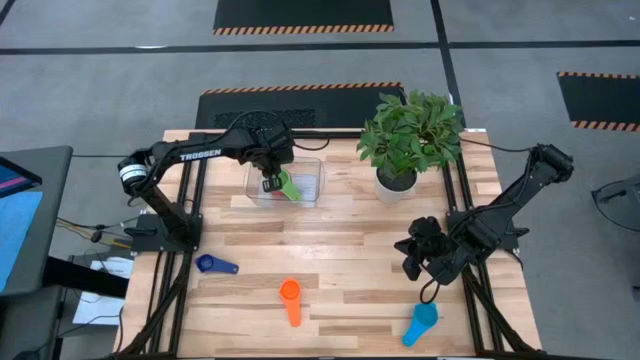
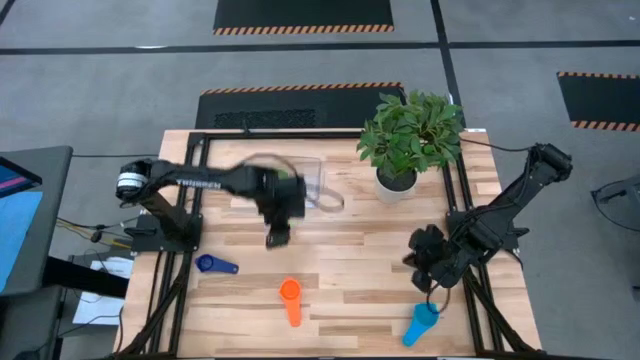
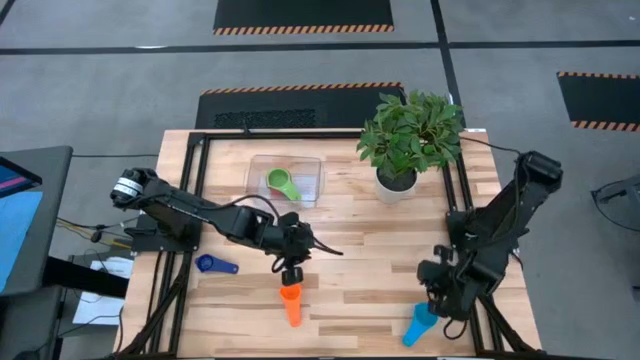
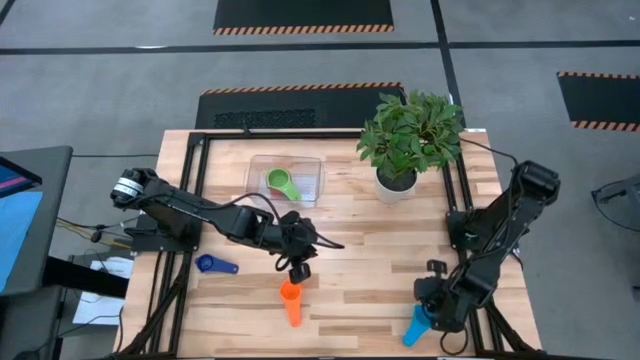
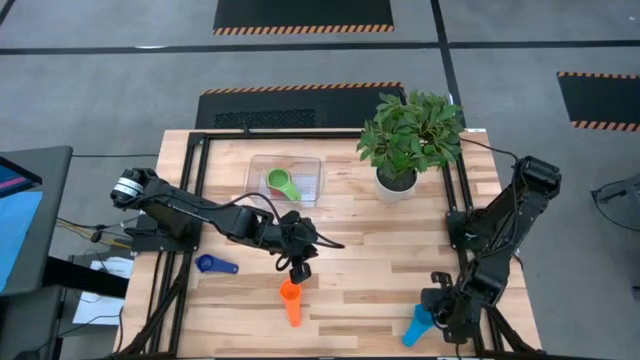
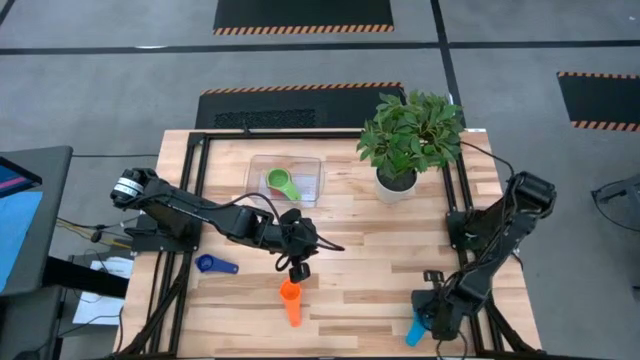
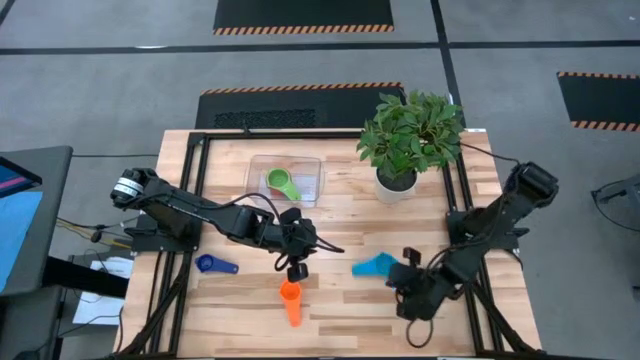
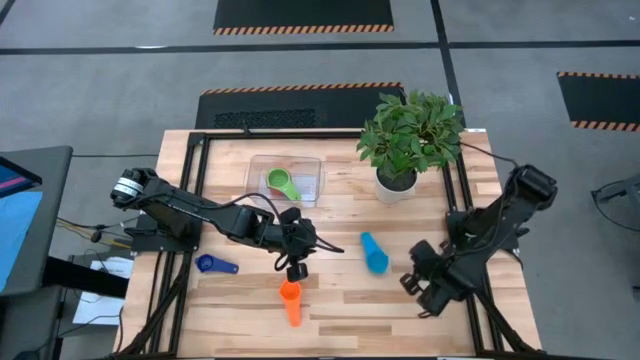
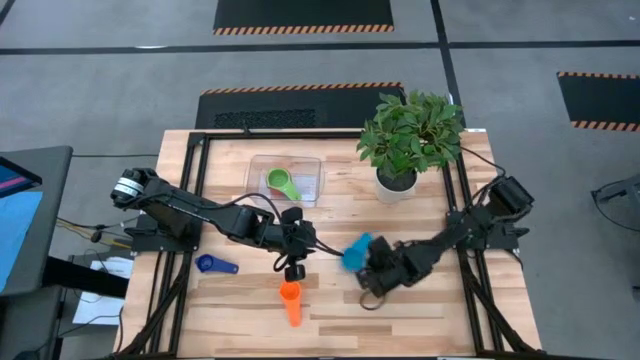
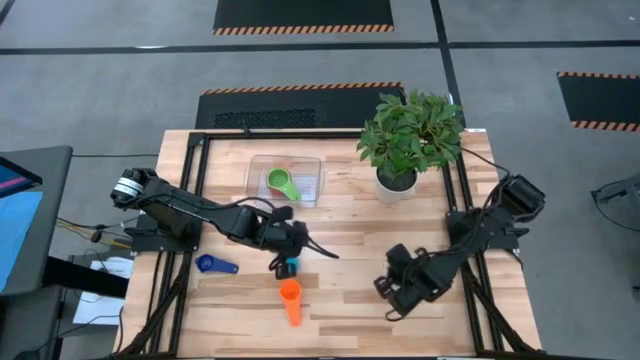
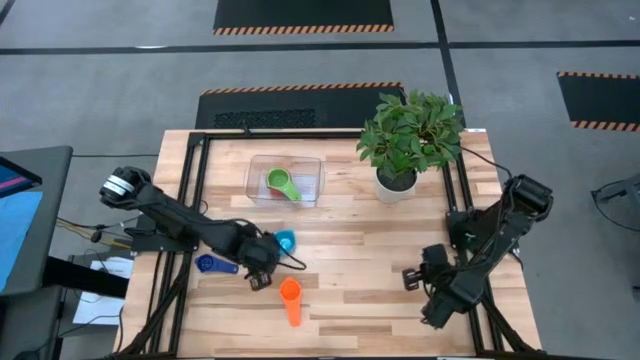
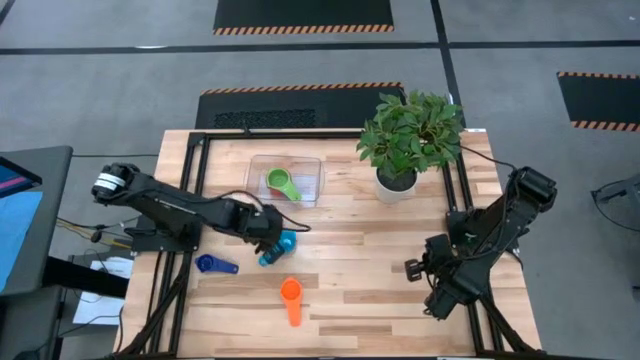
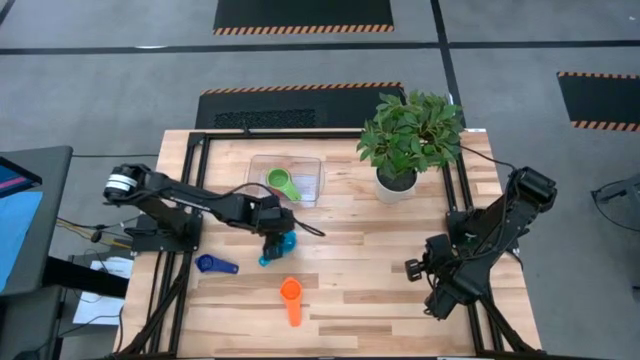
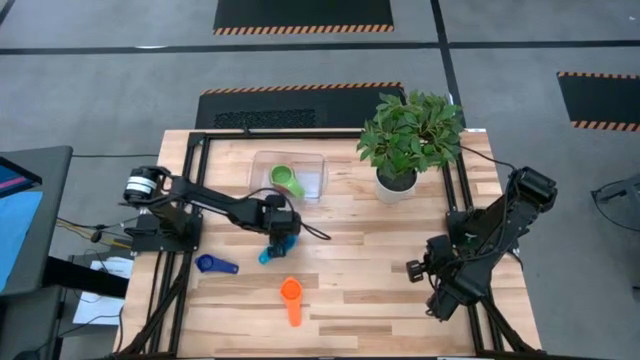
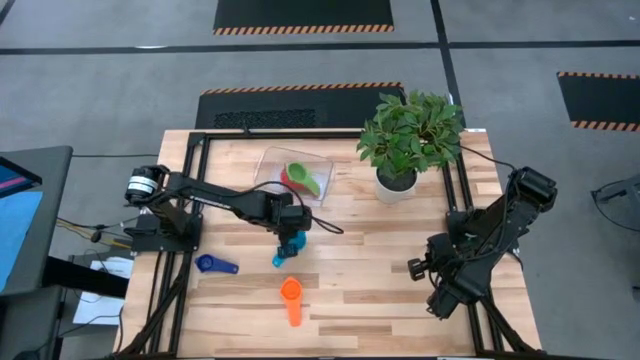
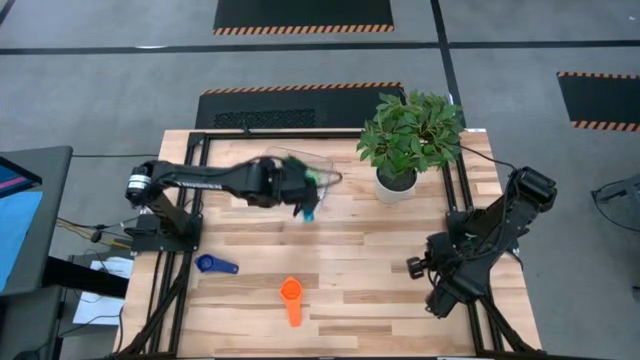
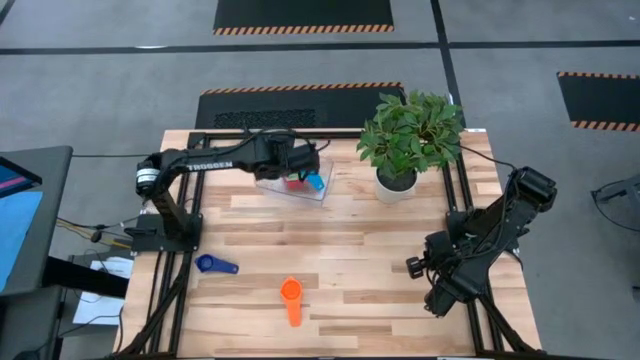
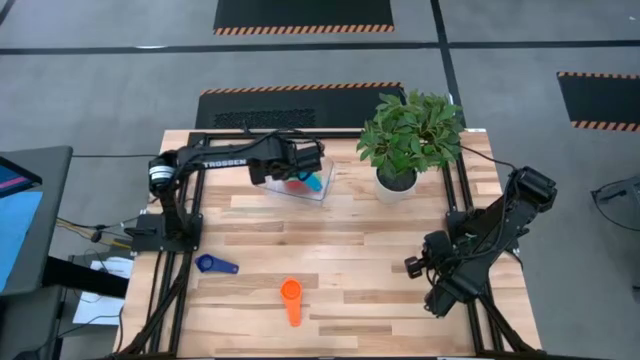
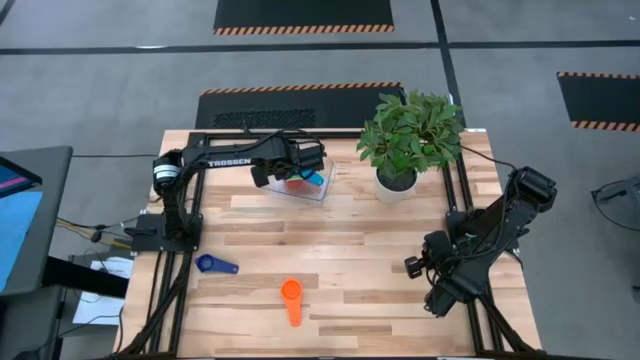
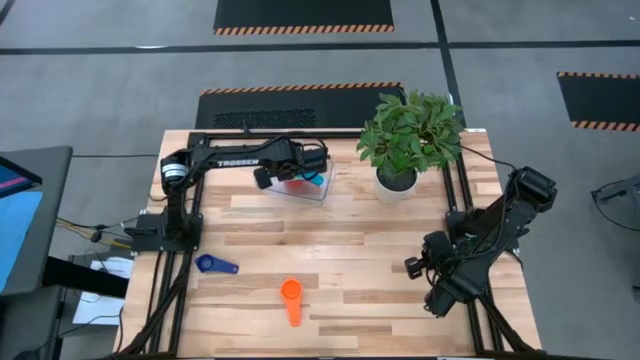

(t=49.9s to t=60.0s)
Task: Nest measuring cups in basket
Stack the light blue measuring cup on top of the green measuring cup in the transparent bin

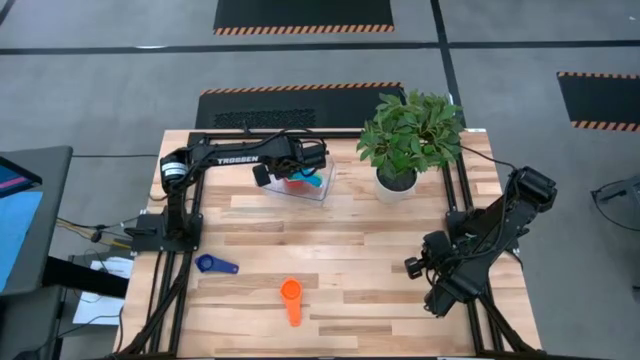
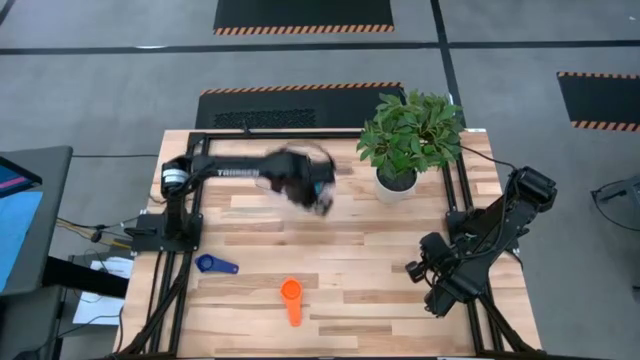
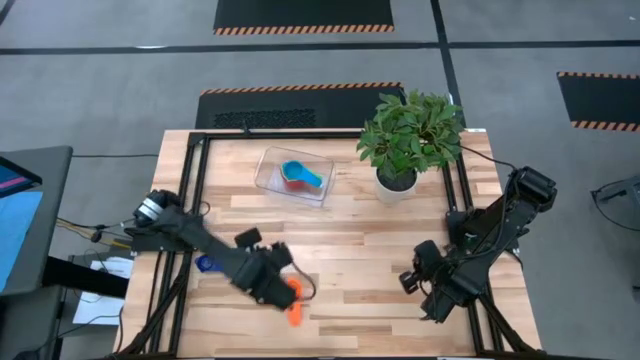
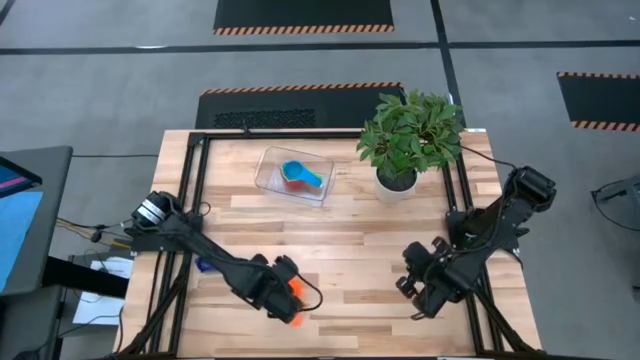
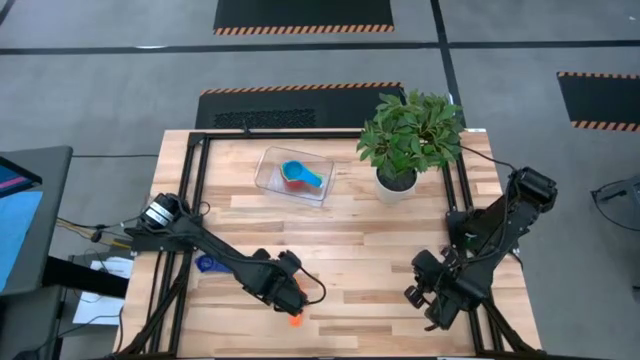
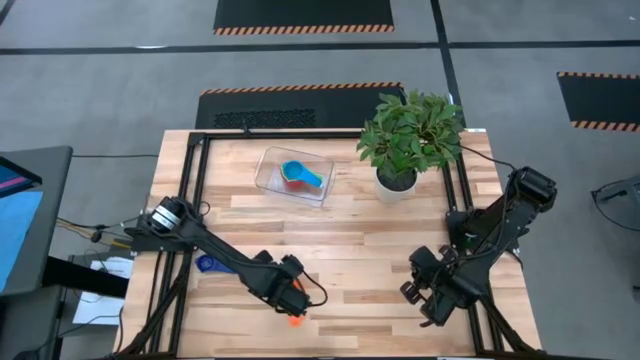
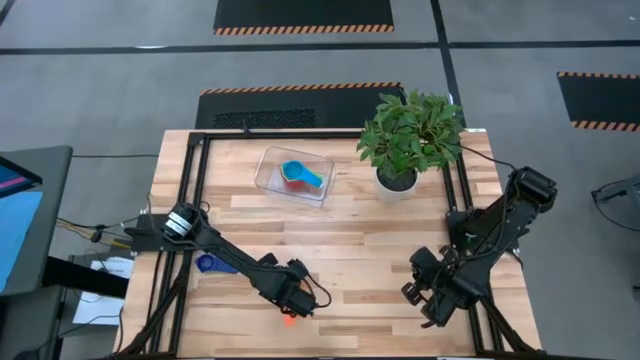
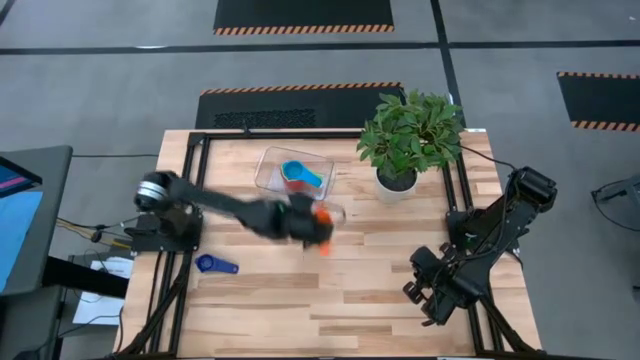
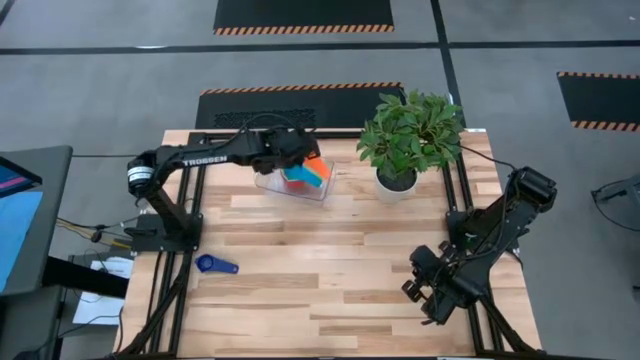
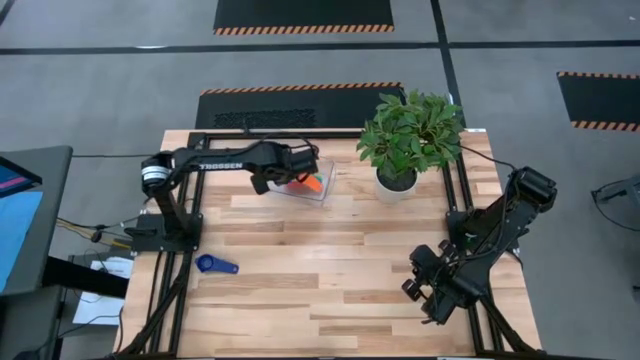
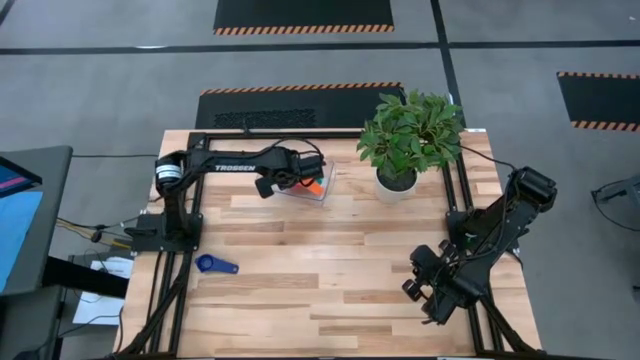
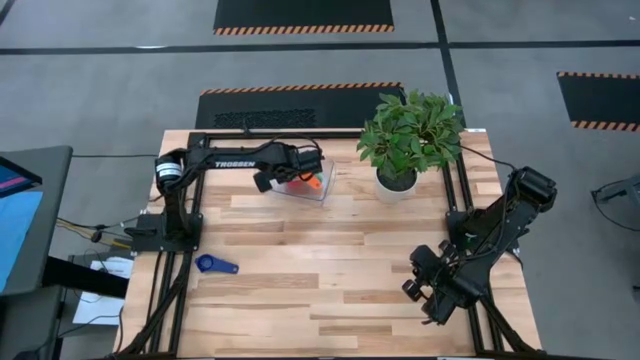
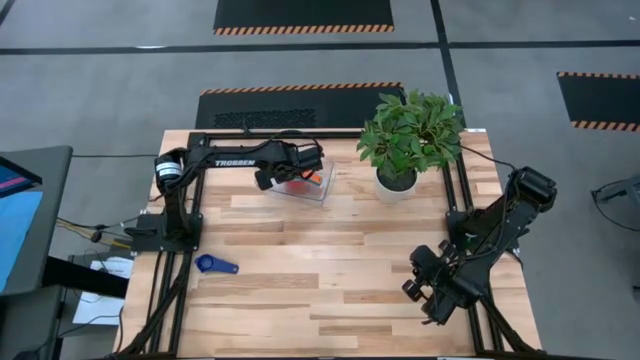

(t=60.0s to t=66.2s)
Stack the orange measuring cup on top of the light blue measuring cup in the transparent bin

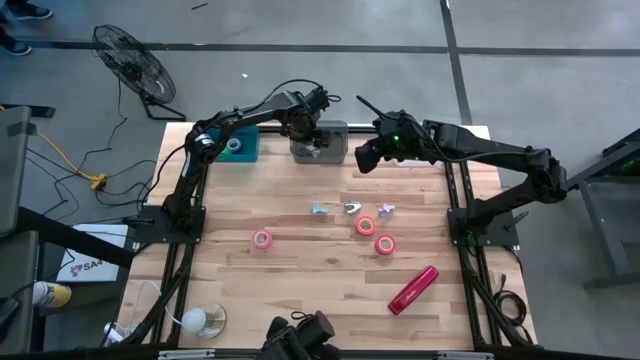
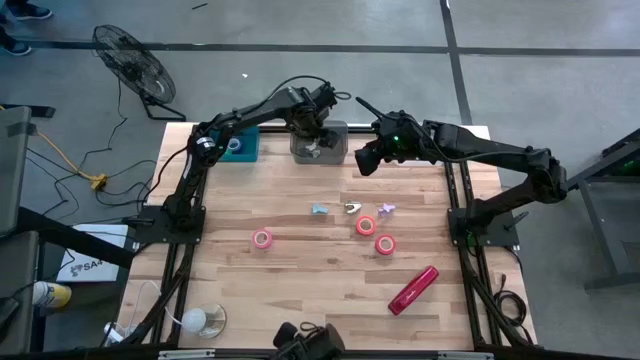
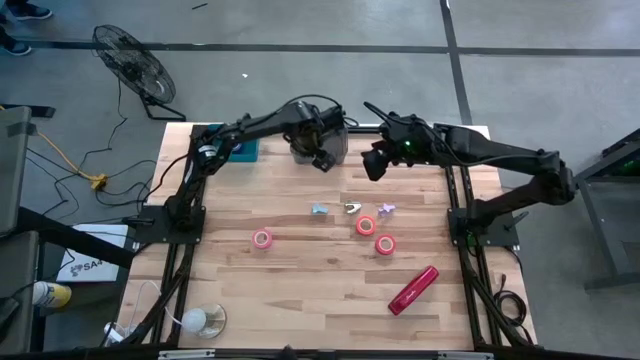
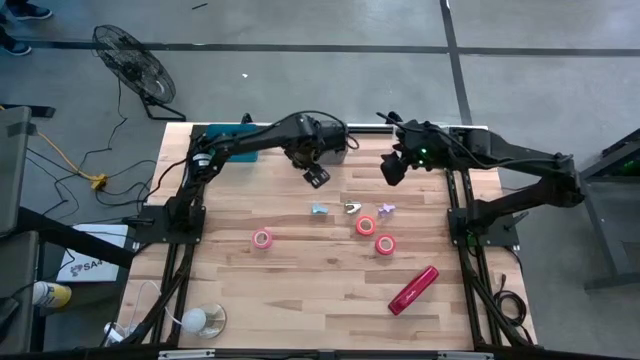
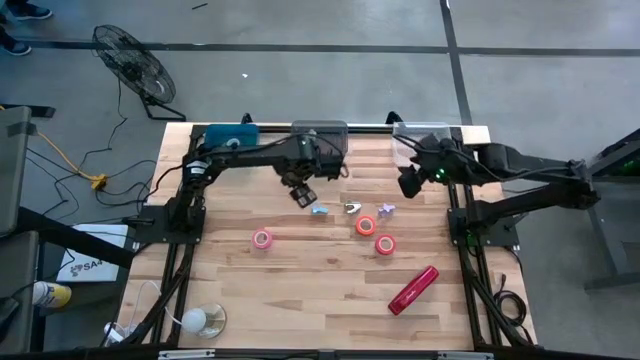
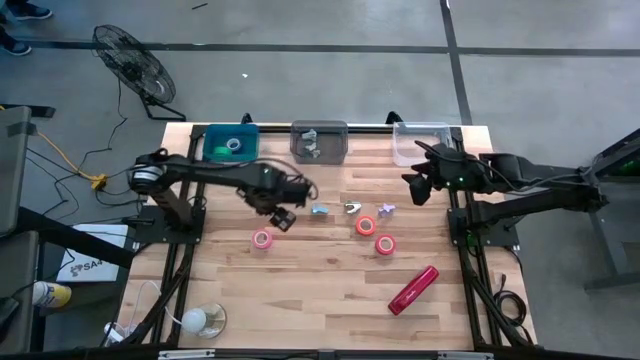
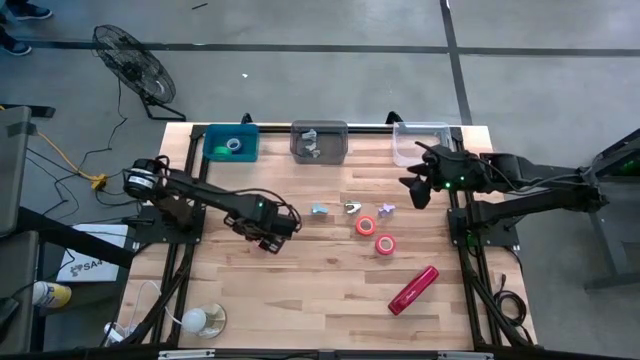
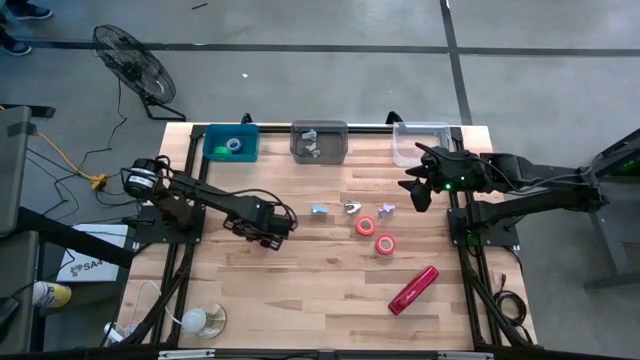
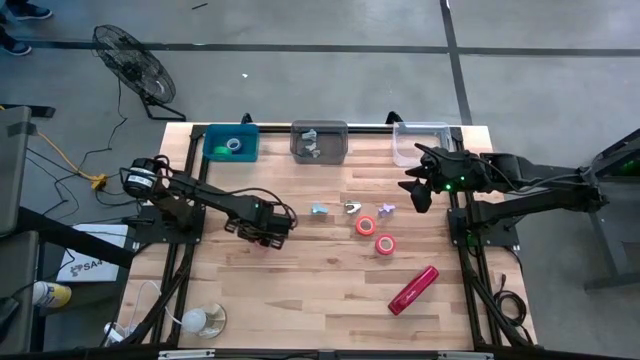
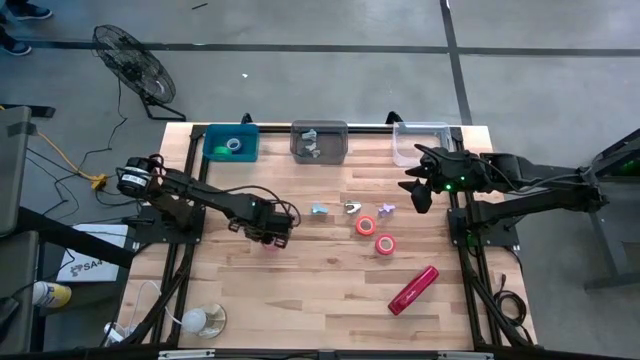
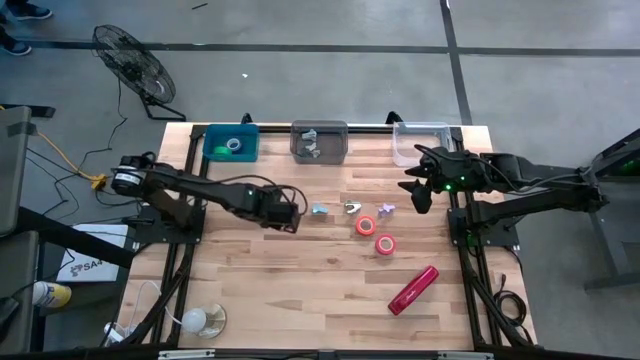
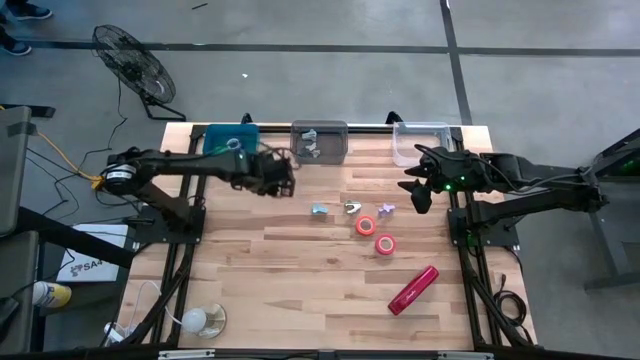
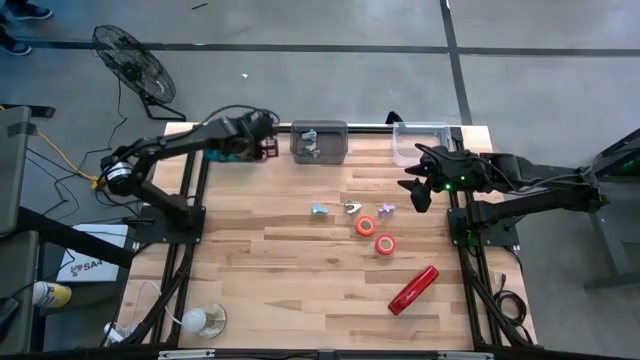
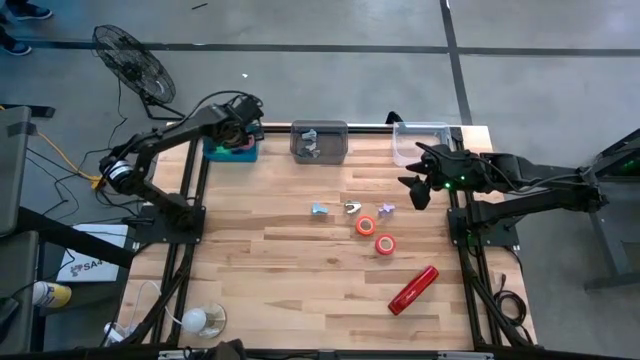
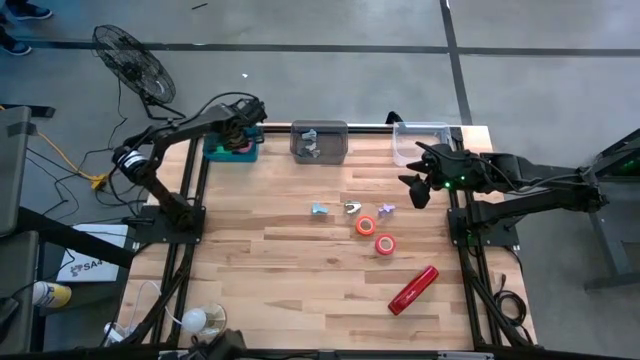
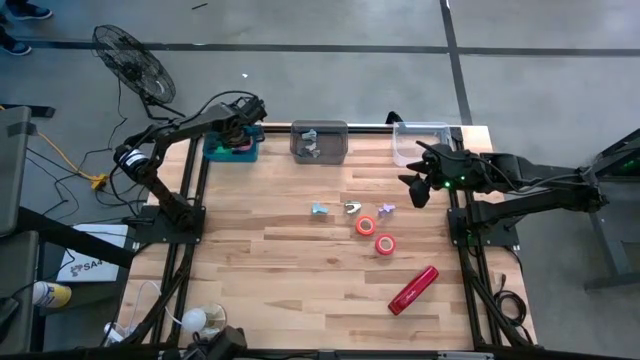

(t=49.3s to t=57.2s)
Task: Pick and place Stapler, Stapler remover, tape
Put the pink tape into the blue bin
